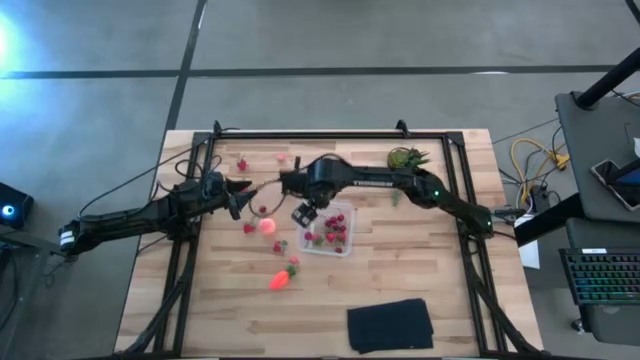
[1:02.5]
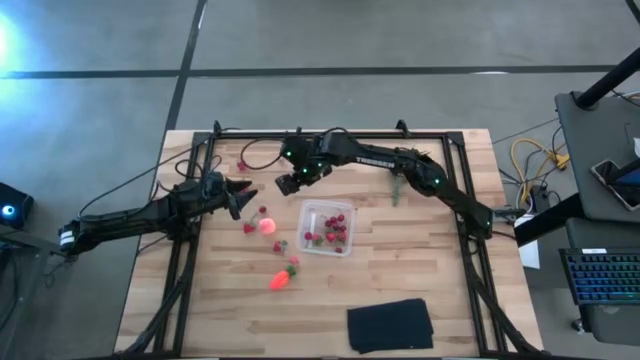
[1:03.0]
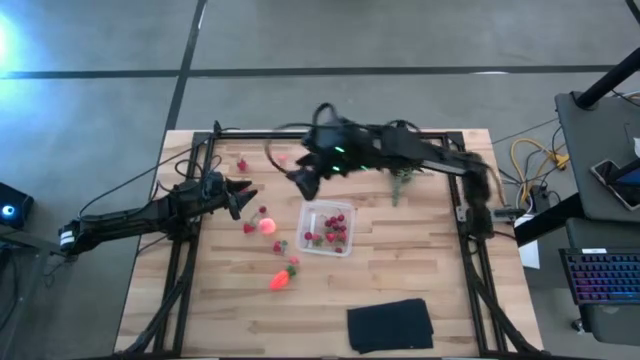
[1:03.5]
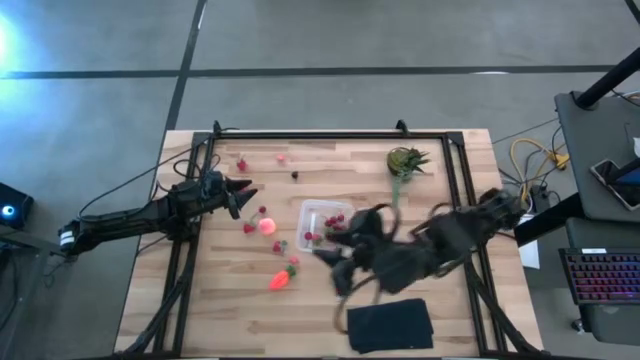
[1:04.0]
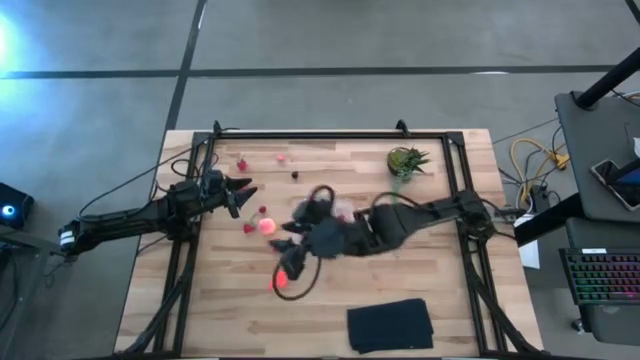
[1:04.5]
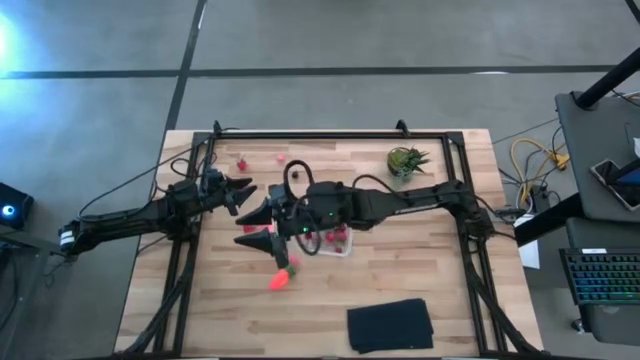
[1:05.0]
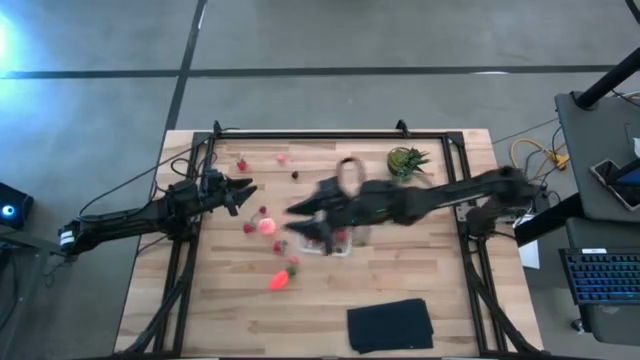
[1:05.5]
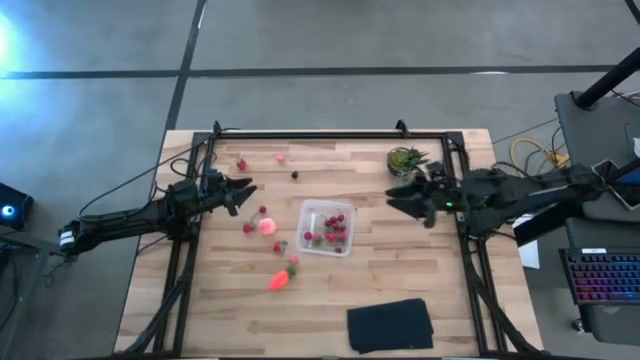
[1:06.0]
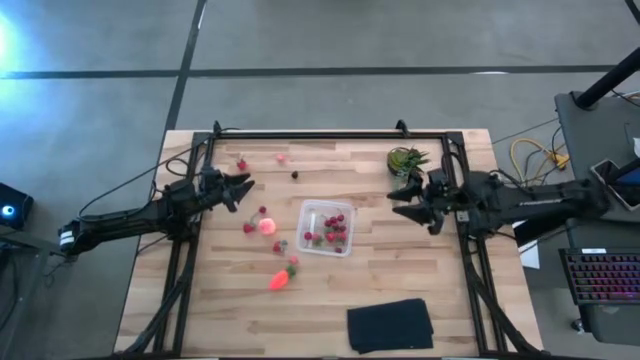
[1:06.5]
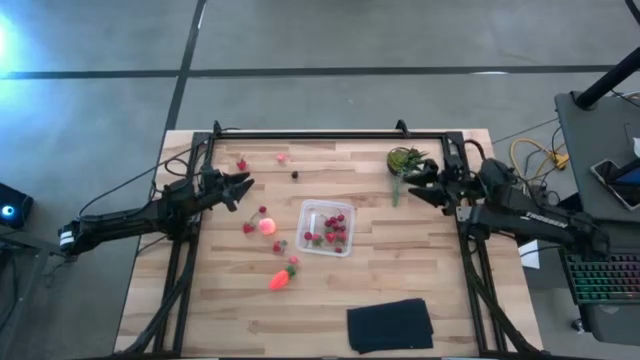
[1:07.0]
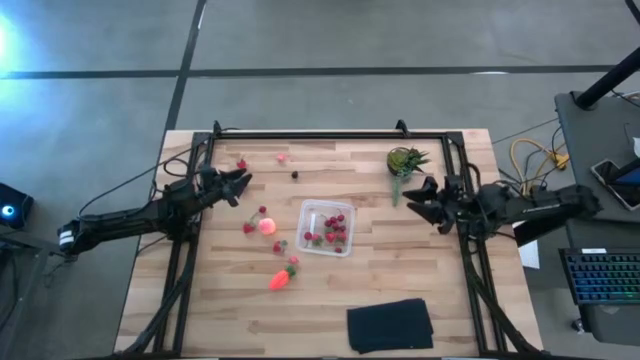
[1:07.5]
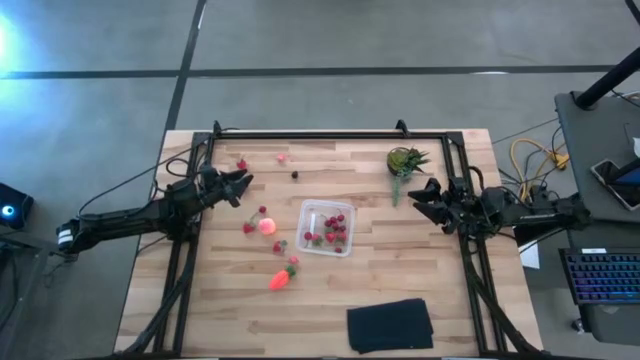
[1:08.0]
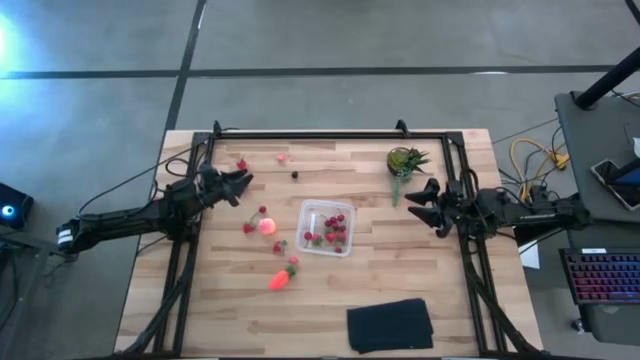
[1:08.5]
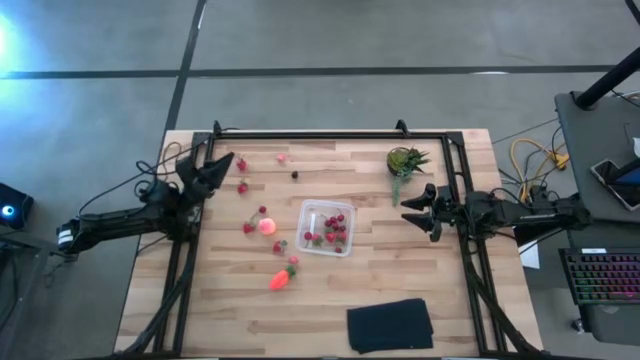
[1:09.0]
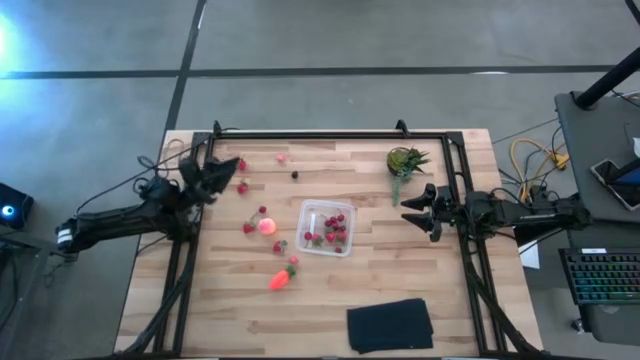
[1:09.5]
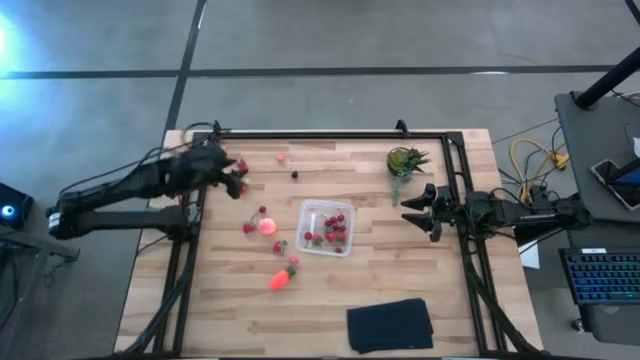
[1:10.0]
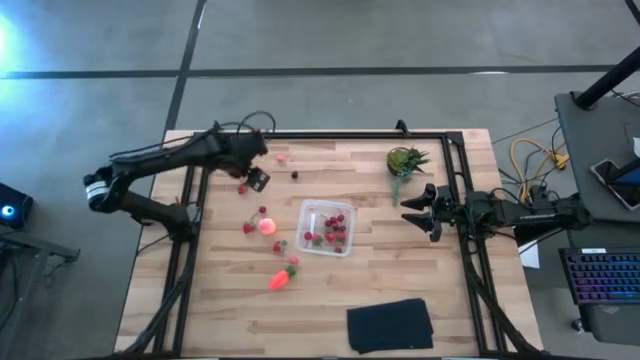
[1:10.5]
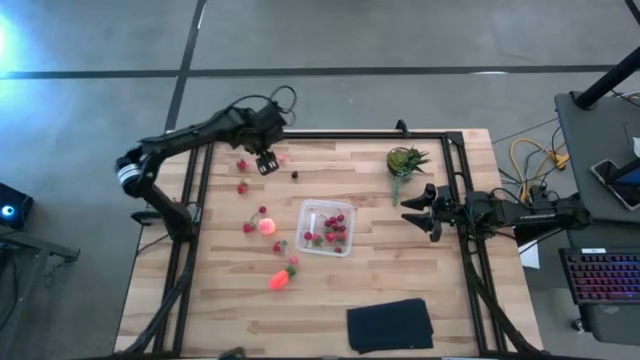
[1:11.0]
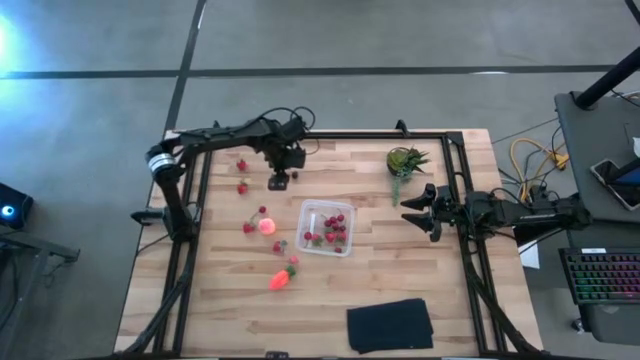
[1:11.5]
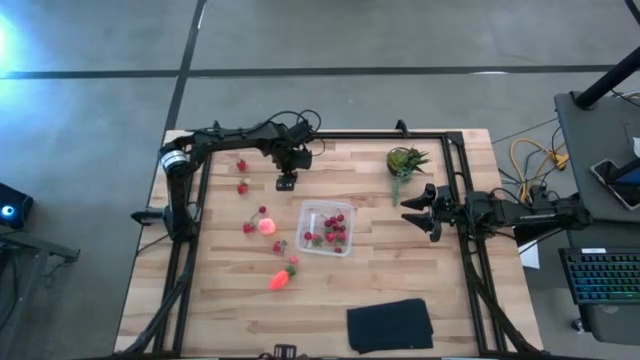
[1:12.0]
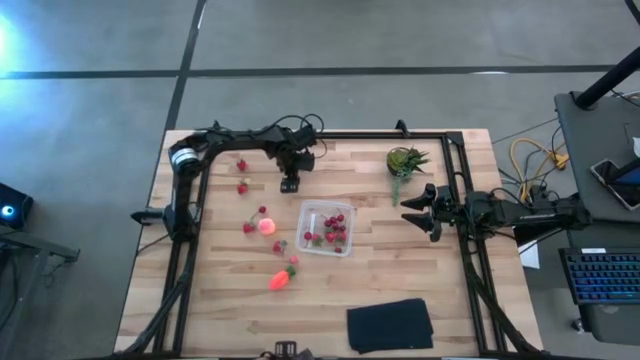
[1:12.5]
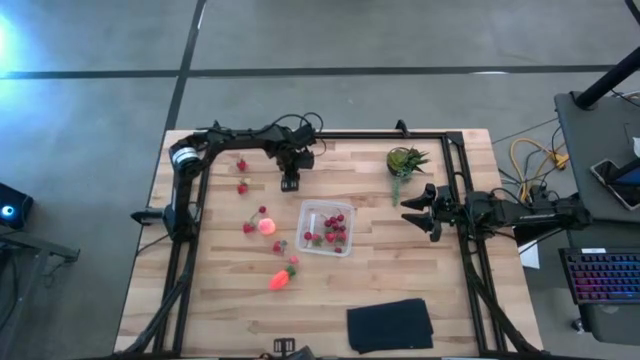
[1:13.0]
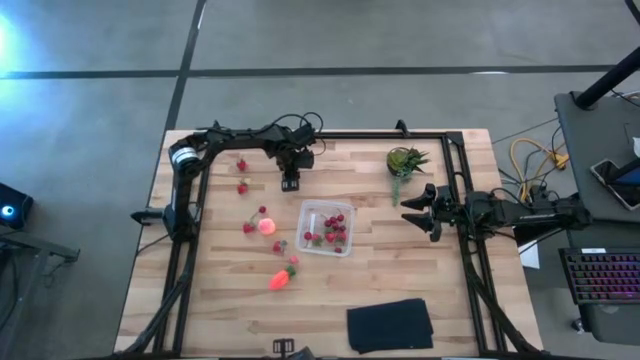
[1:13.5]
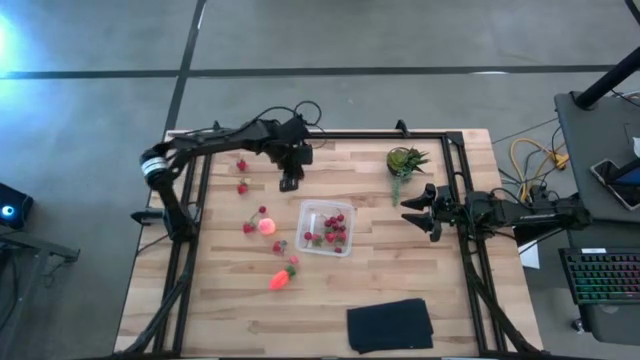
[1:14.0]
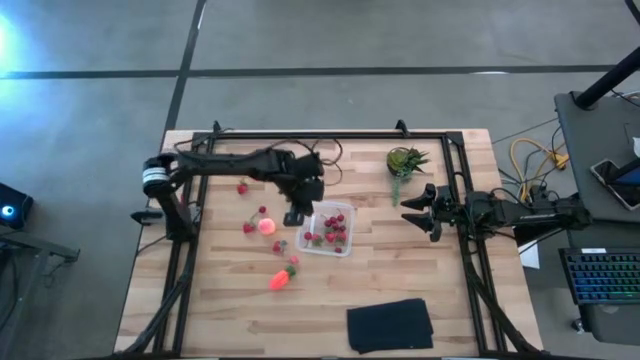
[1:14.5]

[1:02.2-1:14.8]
Task: Pick and placing Produce into tupperware
Put the blackberry into the transparent bin

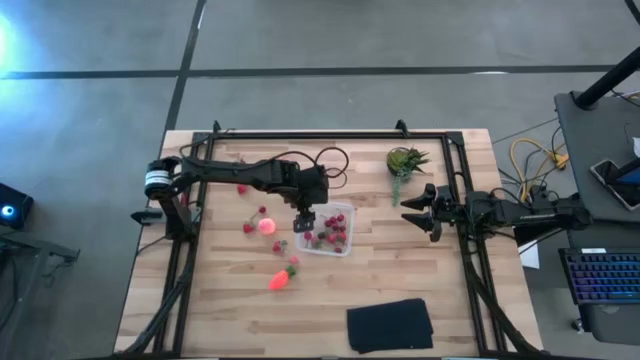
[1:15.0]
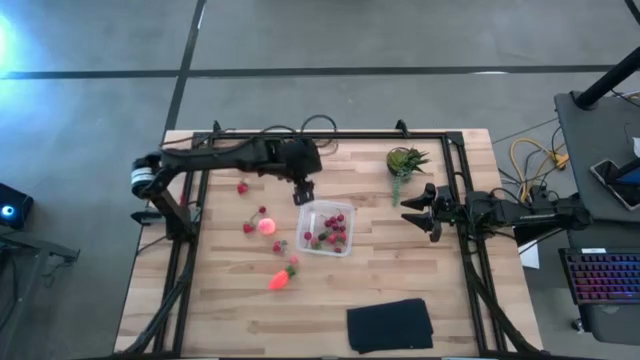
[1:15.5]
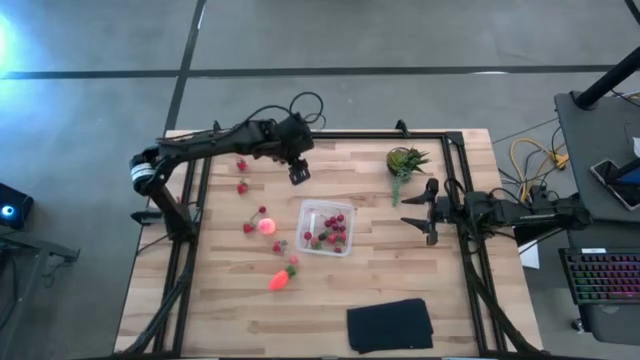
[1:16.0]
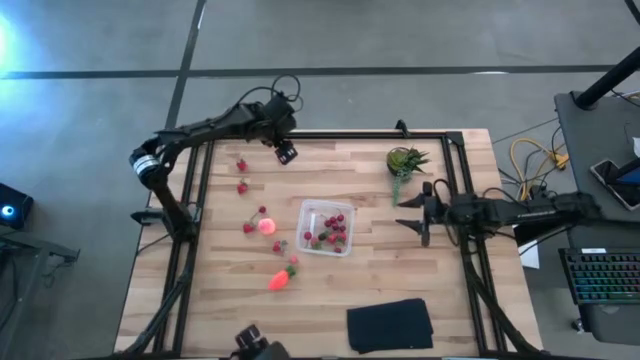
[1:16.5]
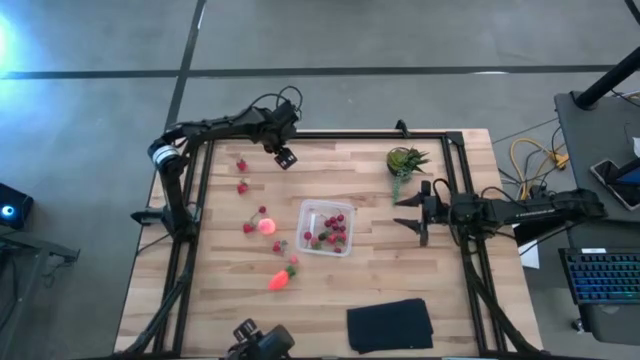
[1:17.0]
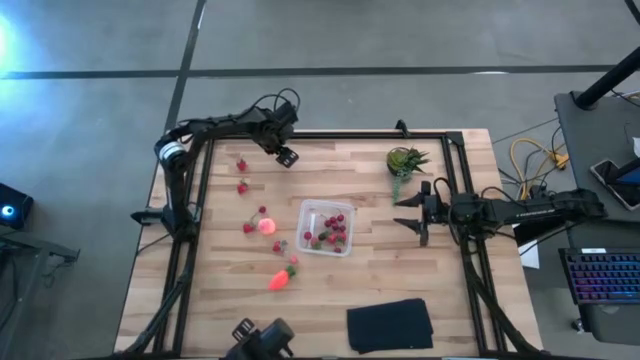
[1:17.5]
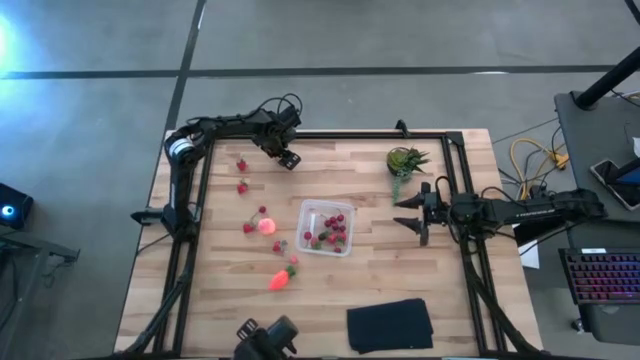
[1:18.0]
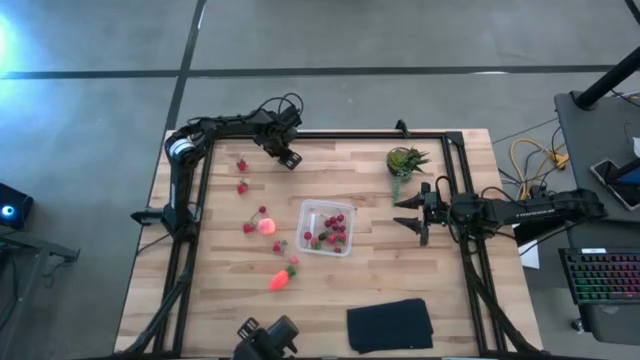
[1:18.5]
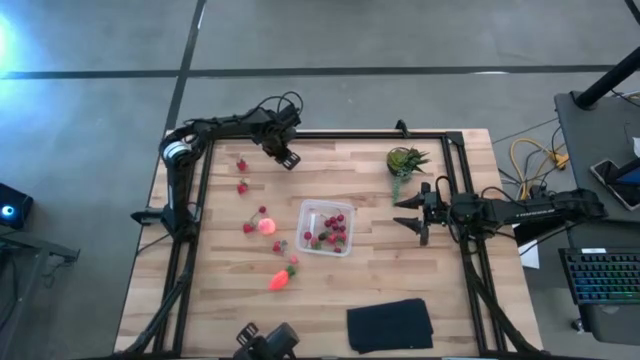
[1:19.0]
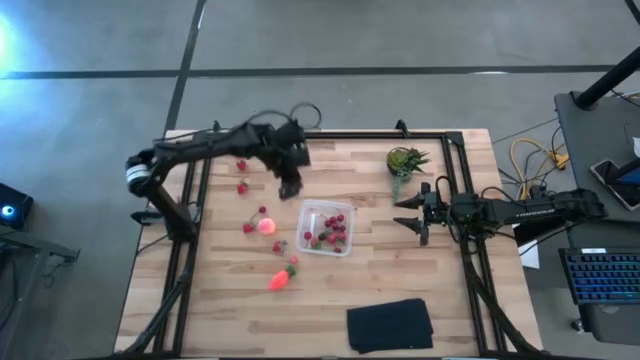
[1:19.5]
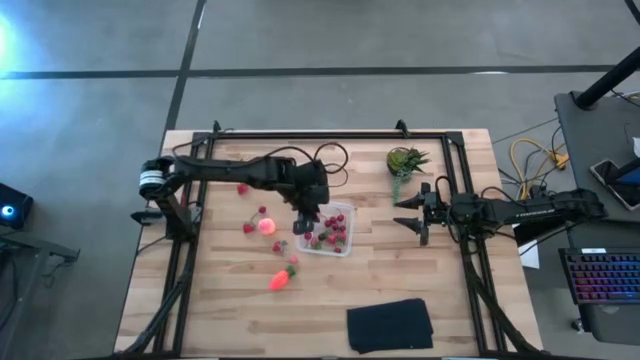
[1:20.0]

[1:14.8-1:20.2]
Put the pink peach into the transparent bin

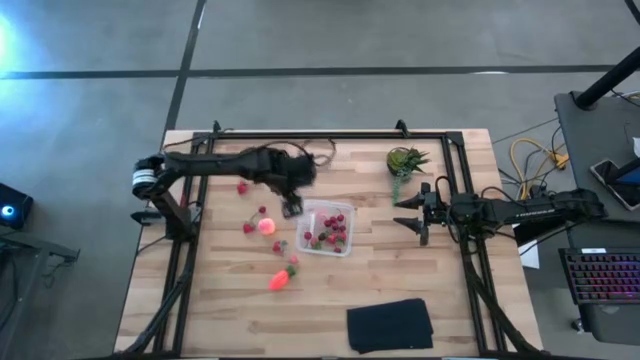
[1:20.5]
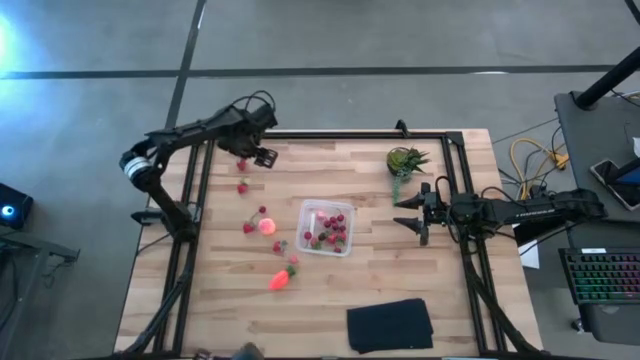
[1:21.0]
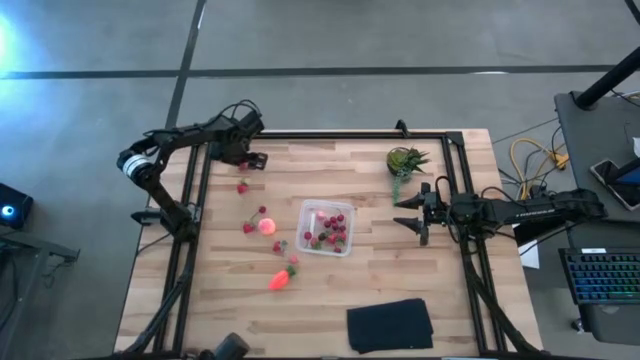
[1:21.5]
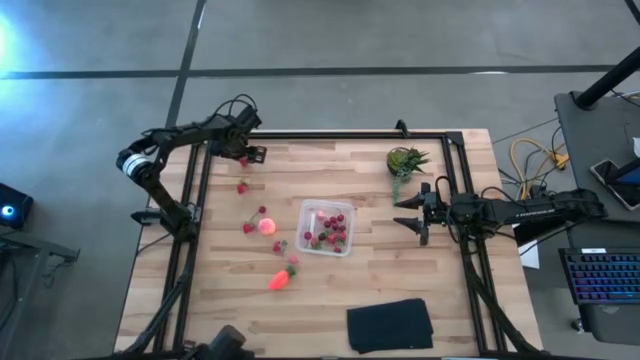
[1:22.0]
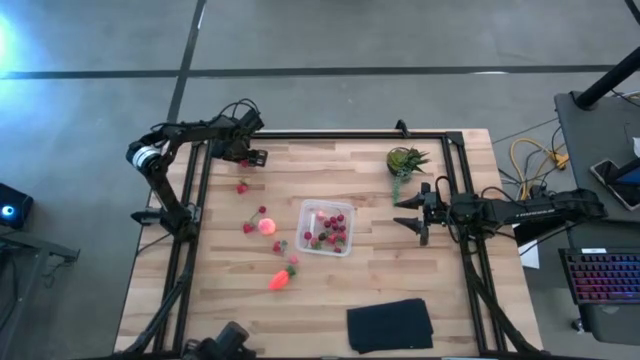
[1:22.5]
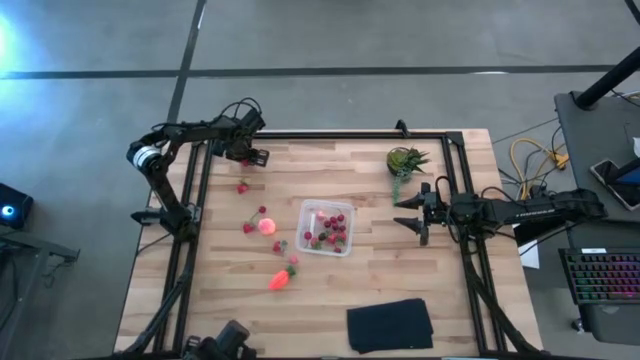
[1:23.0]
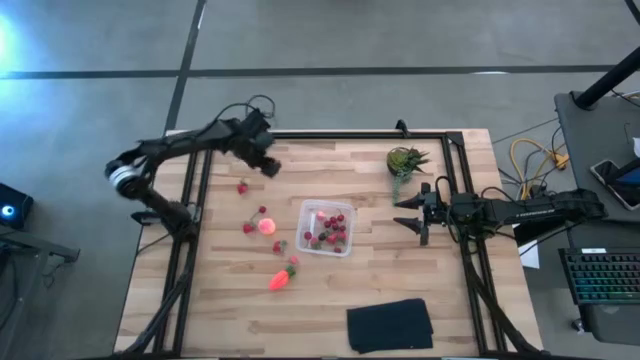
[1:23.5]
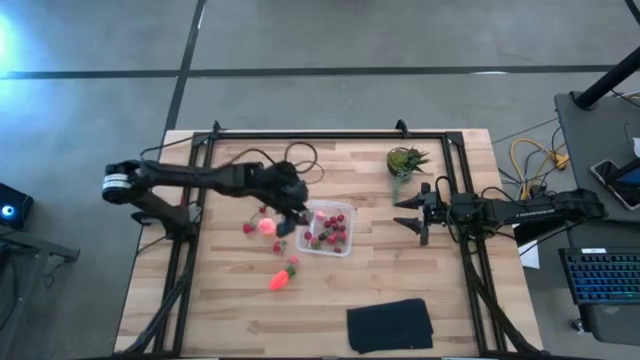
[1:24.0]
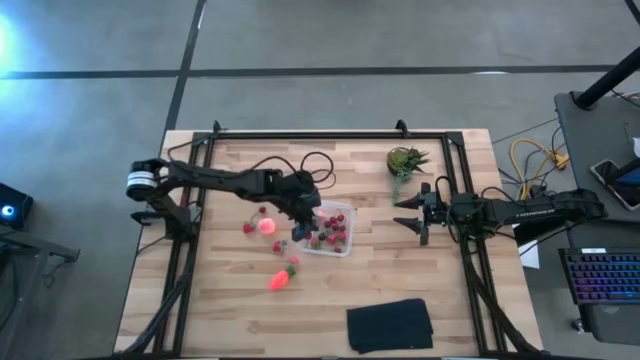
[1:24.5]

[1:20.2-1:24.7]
Put the red strawberry into the transparent bin
